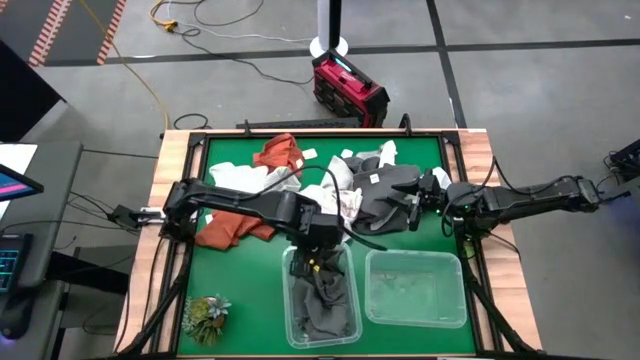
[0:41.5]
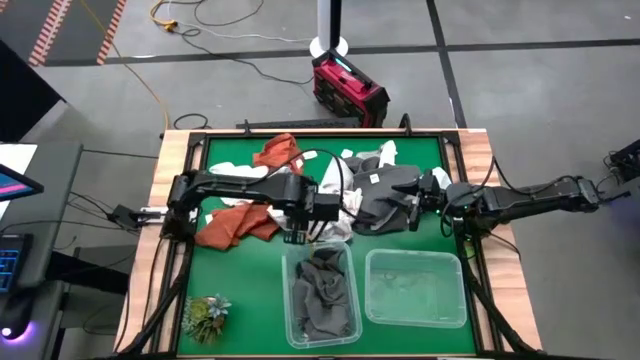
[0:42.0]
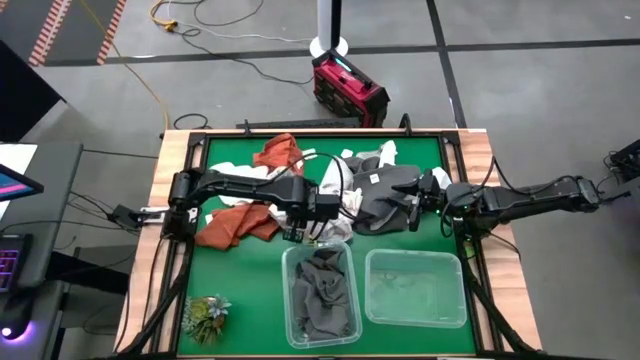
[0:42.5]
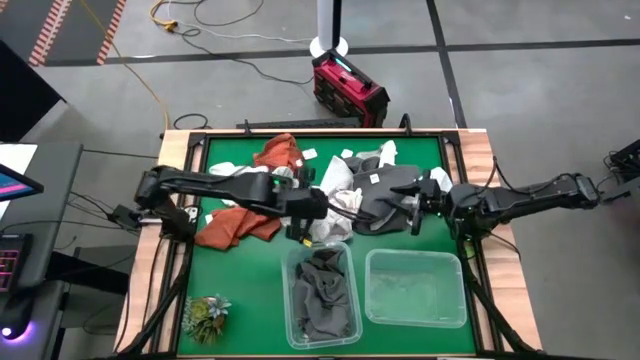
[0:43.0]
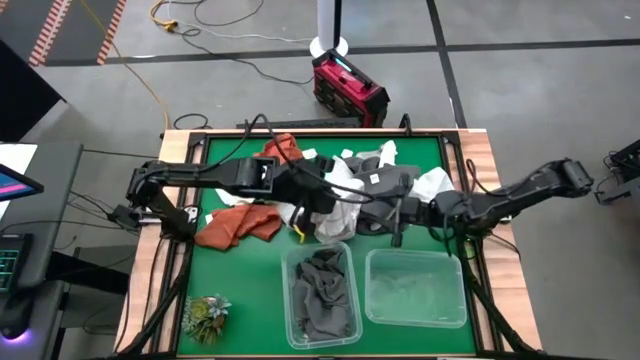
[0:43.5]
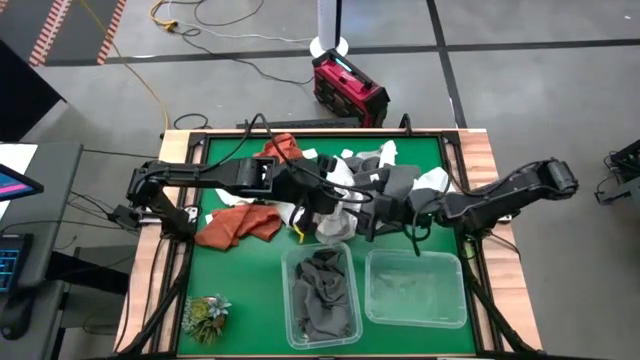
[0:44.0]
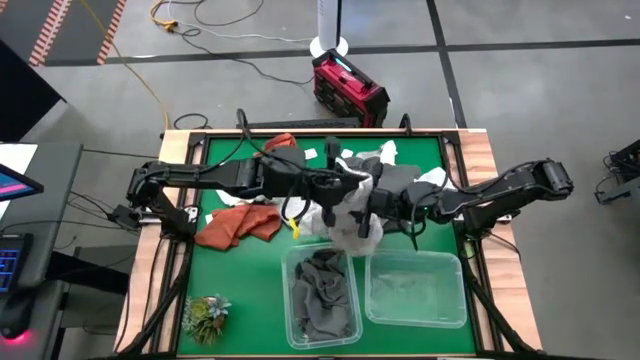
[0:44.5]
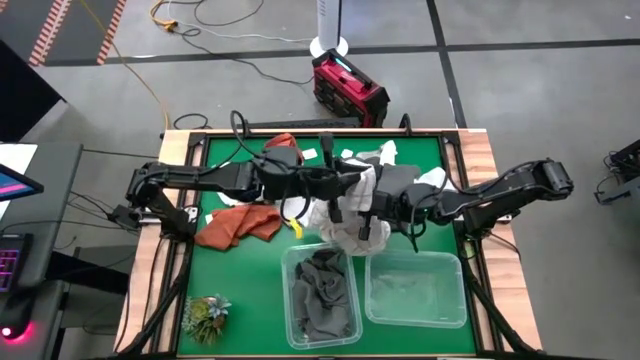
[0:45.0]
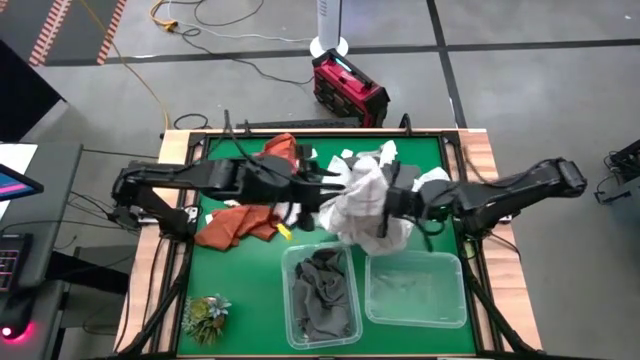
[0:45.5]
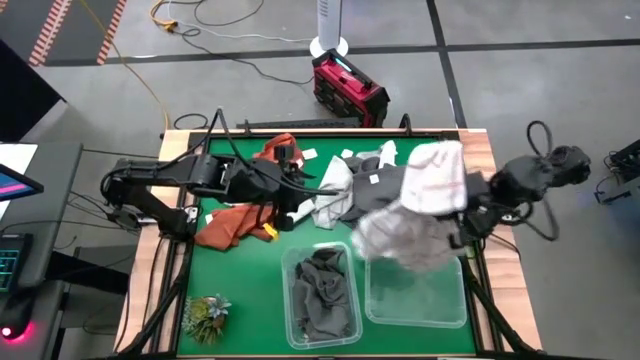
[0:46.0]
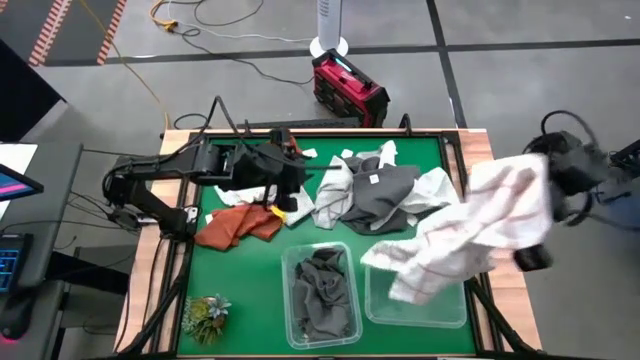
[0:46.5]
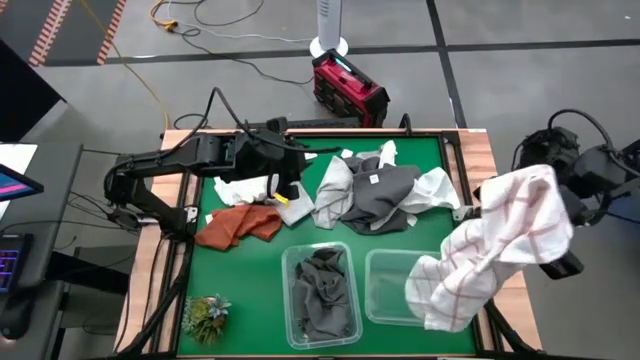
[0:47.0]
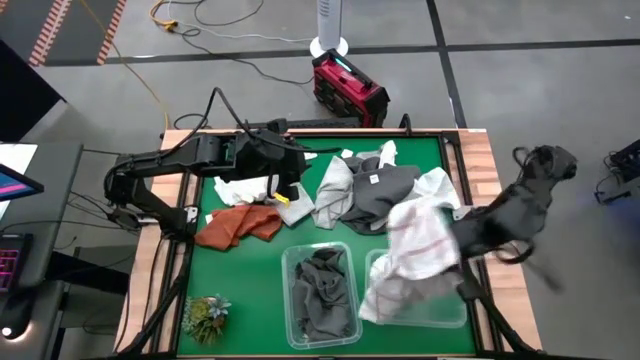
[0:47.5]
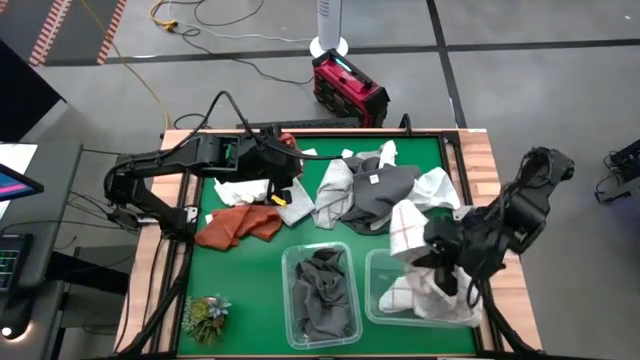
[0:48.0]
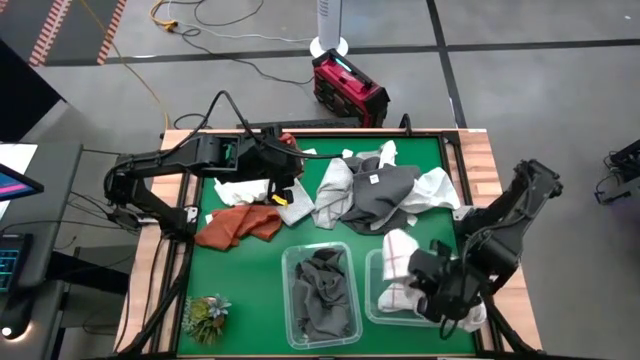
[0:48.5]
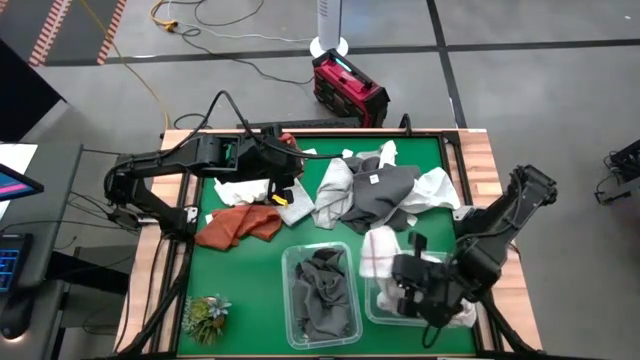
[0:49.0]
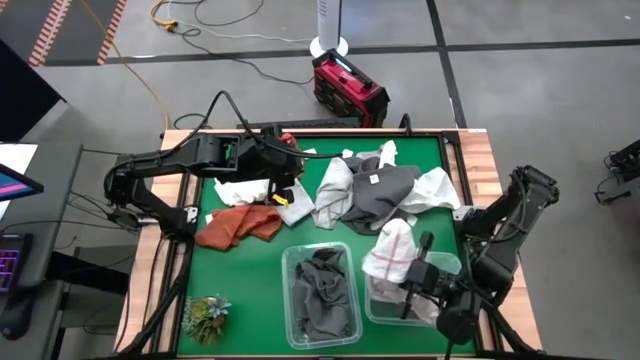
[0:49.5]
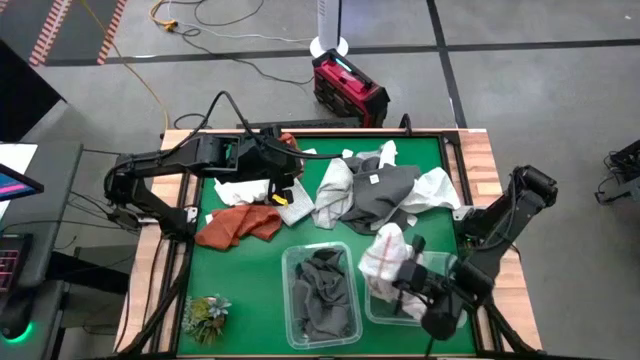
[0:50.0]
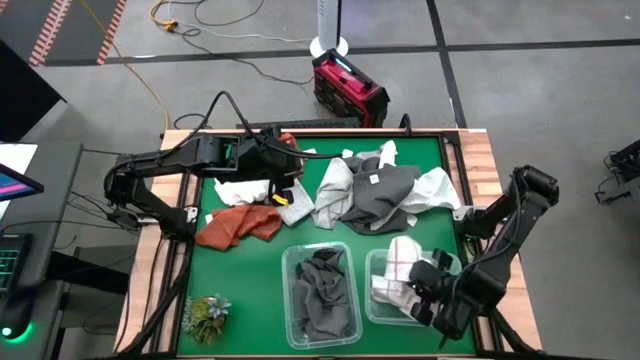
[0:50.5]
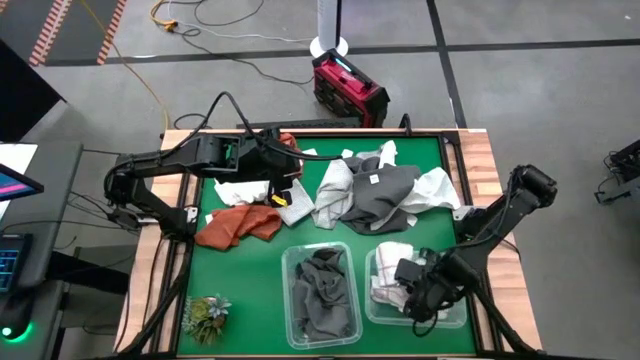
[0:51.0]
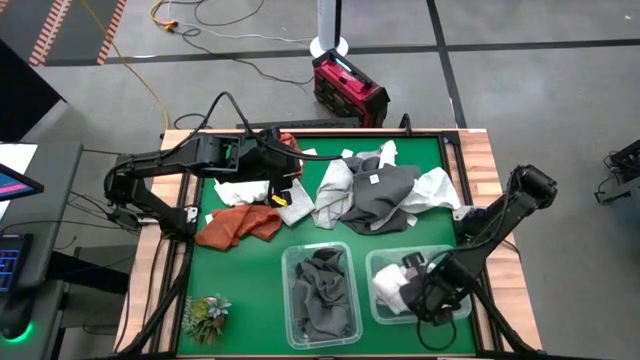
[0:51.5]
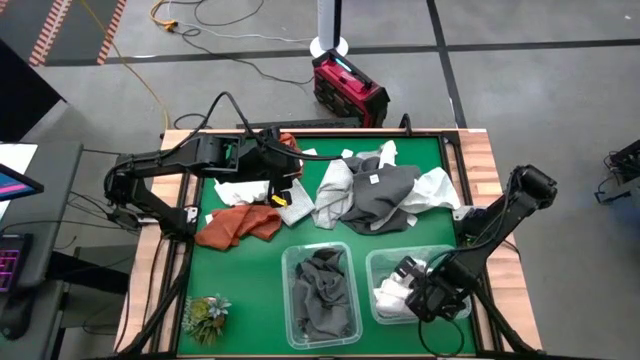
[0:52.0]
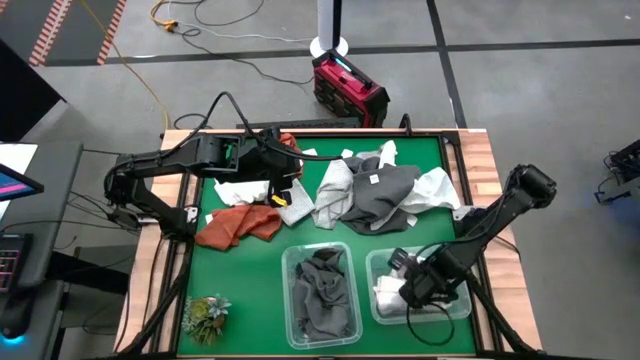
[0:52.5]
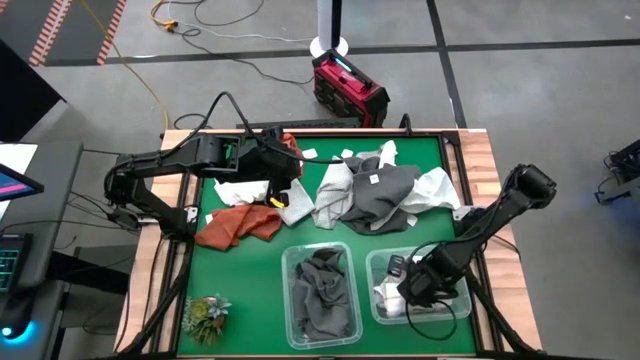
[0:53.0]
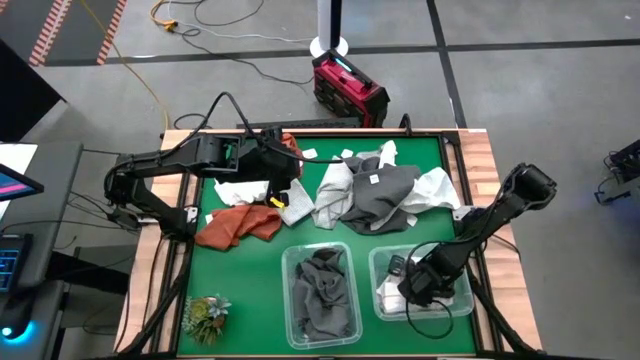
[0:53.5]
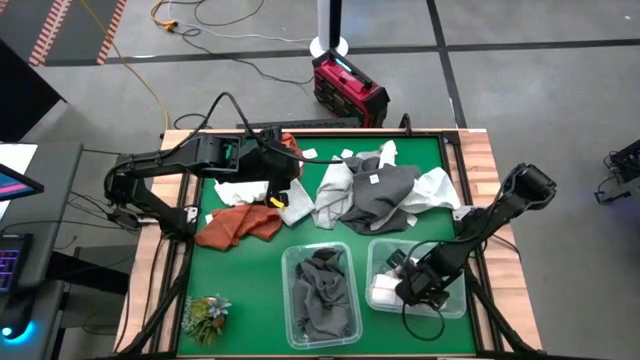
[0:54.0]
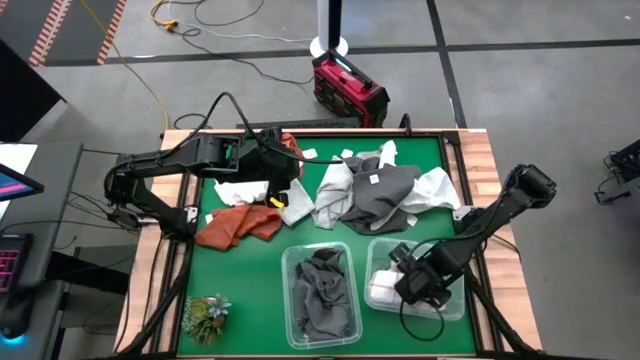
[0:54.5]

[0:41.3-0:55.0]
Task: Sort towels by color in basket
Put the white and orange towel into the right transparent bin

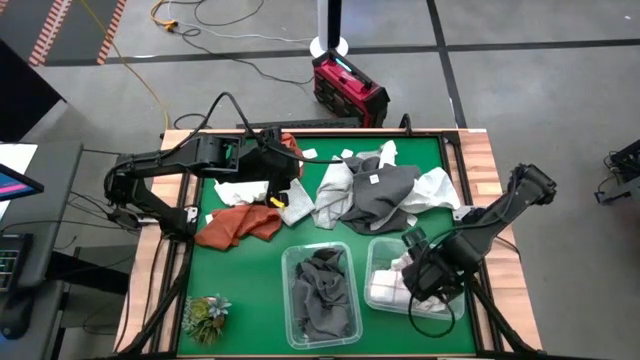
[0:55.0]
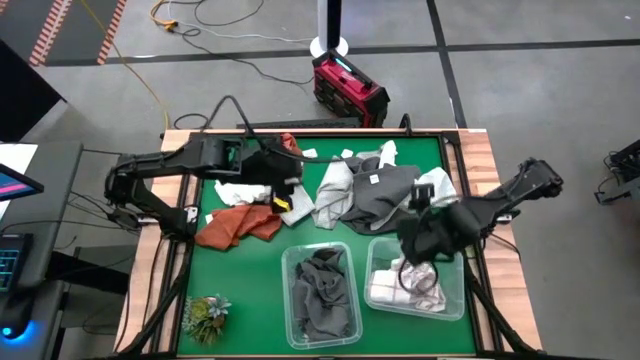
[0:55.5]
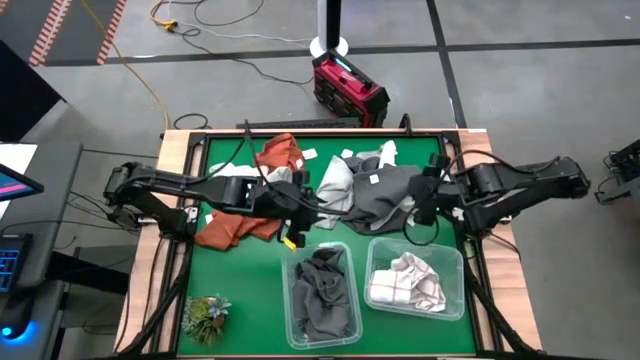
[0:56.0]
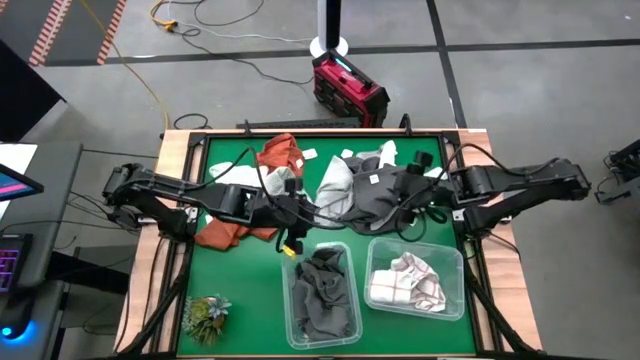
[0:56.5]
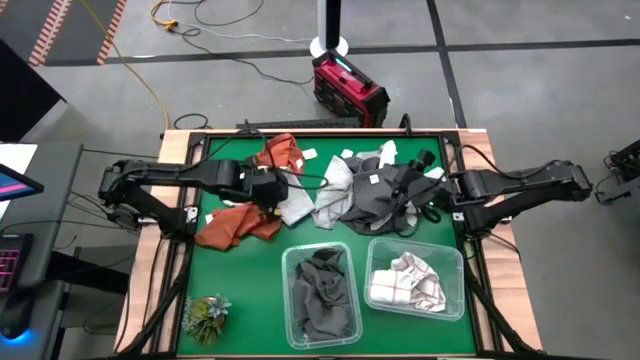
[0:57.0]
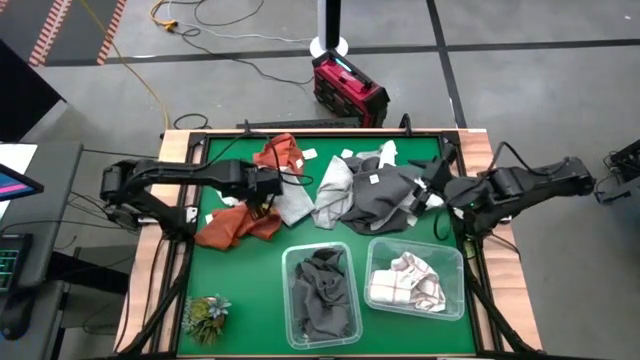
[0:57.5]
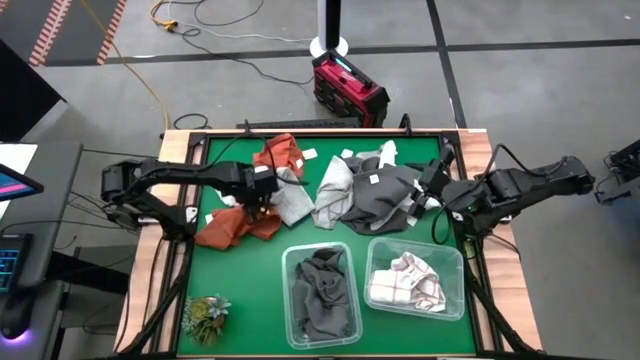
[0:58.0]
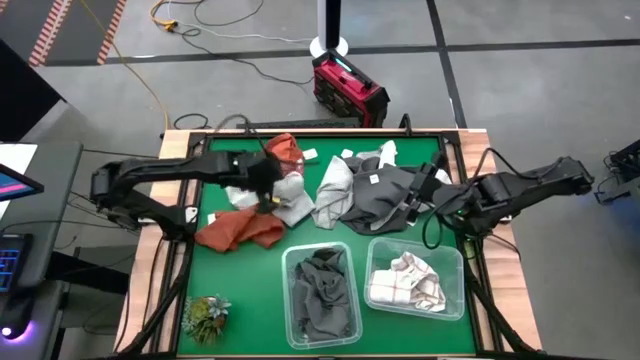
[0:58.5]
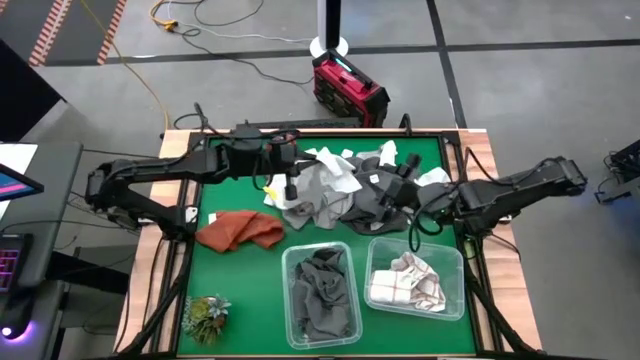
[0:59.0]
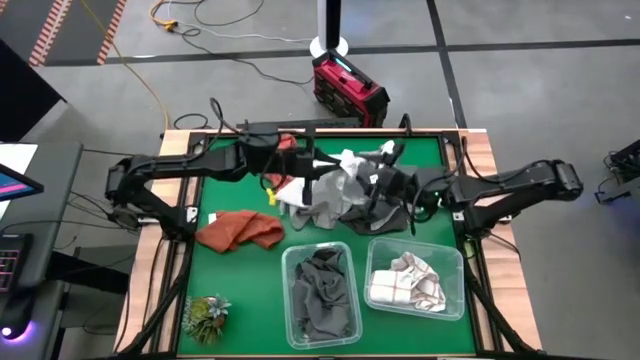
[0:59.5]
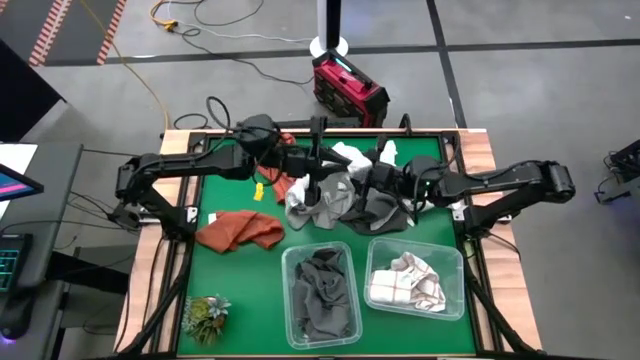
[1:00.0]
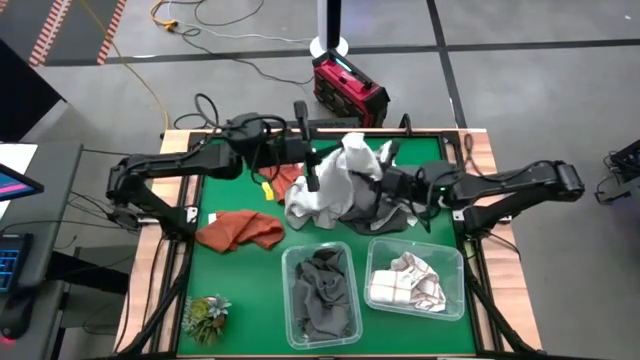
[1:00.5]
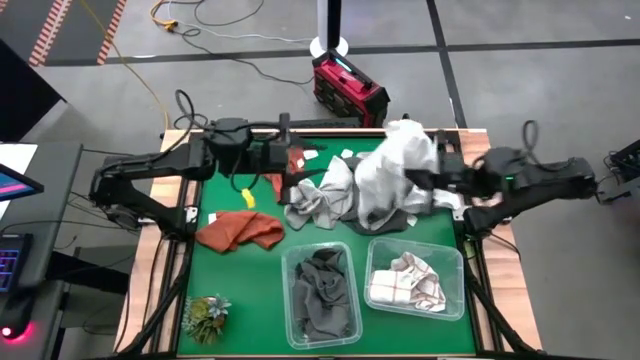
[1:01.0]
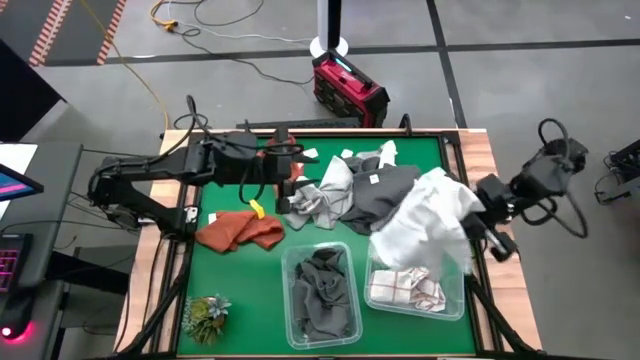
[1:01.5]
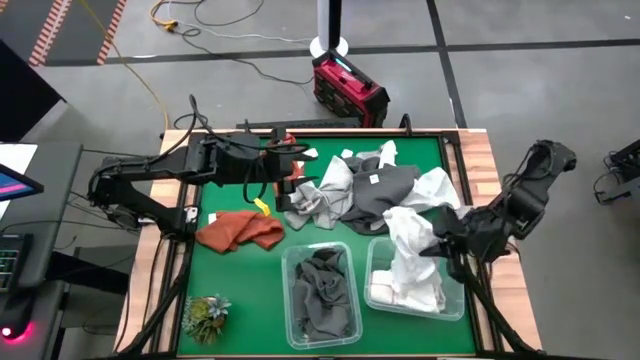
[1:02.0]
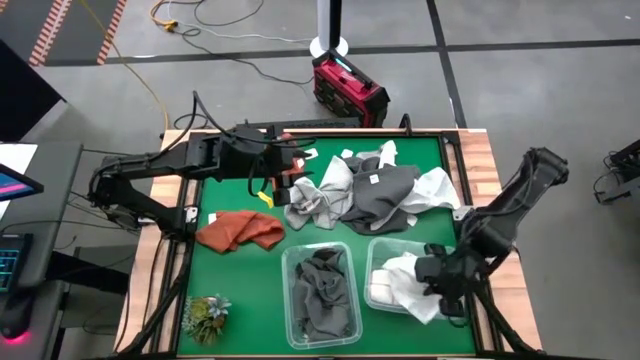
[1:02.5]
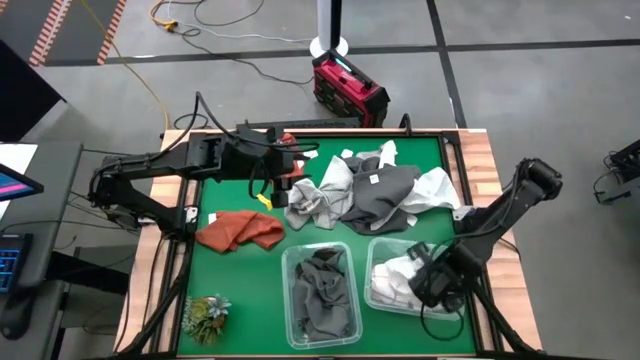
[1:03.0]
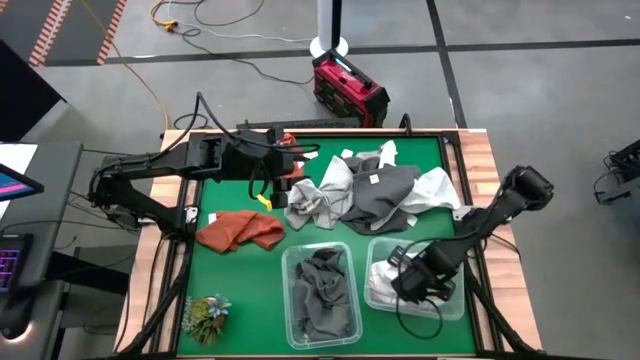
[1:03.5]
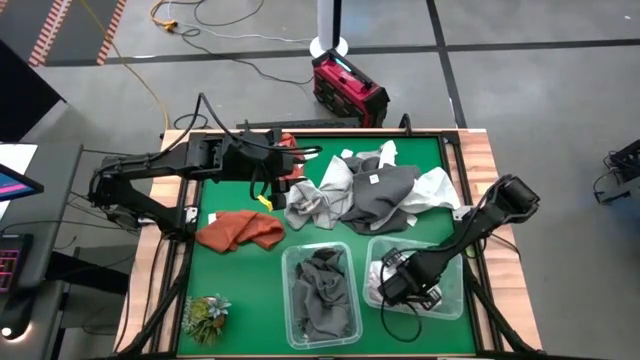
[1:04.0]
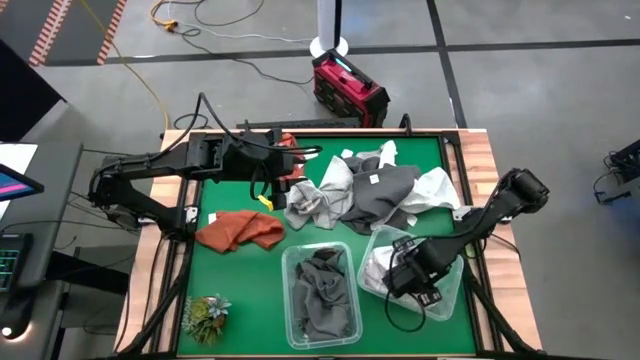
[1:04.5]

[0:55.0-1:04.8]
Put the left white towel into the right transparent bin
